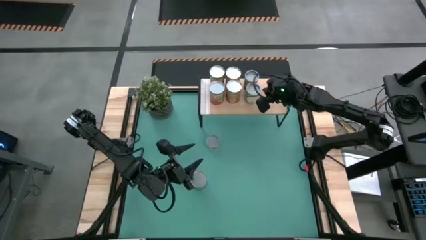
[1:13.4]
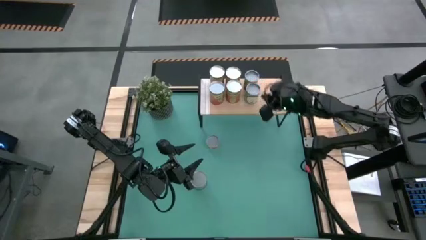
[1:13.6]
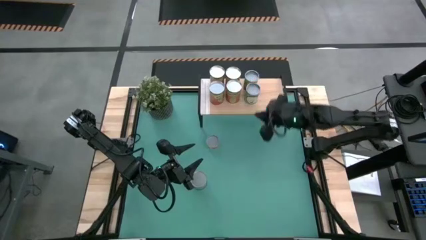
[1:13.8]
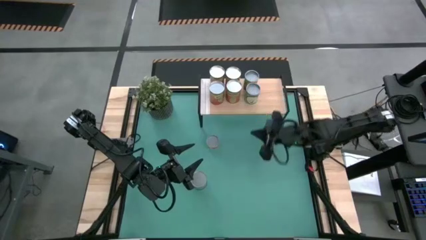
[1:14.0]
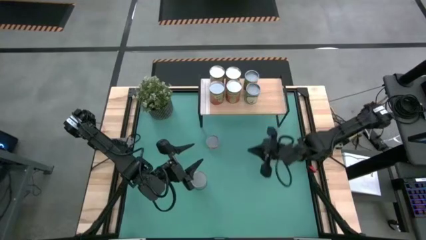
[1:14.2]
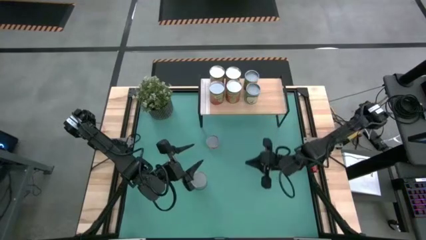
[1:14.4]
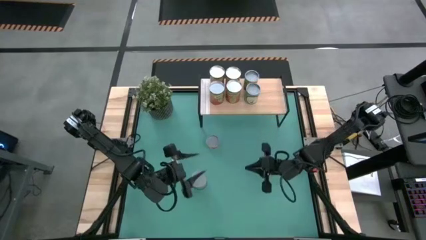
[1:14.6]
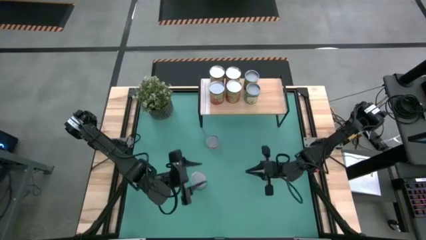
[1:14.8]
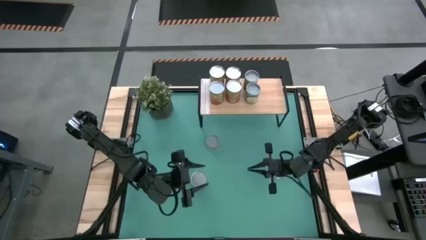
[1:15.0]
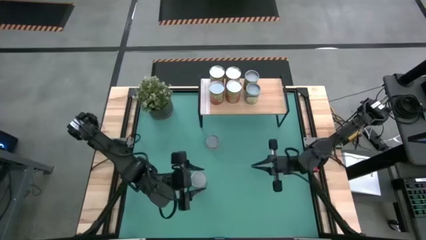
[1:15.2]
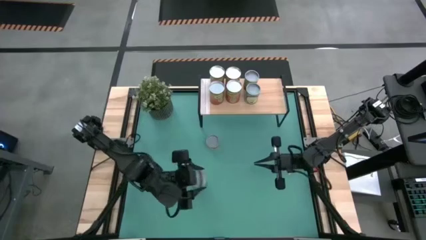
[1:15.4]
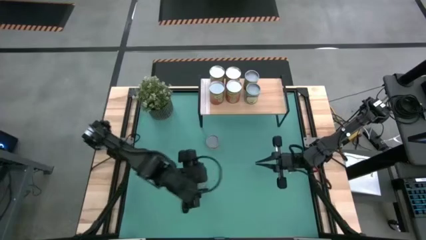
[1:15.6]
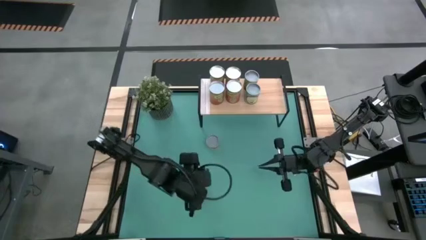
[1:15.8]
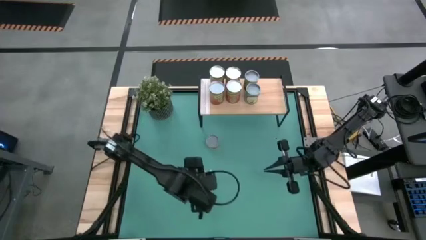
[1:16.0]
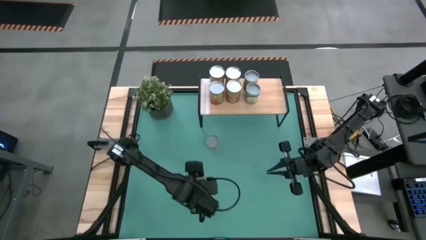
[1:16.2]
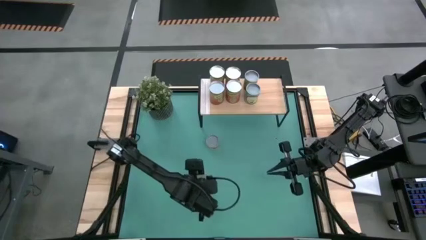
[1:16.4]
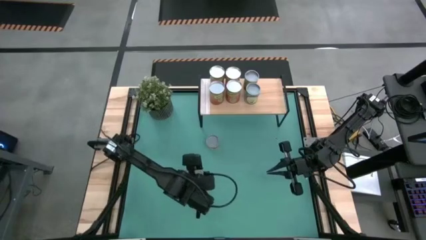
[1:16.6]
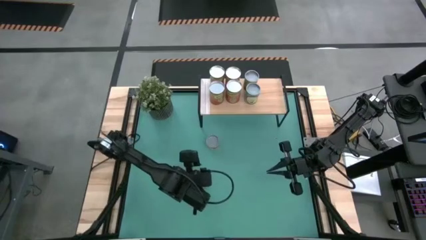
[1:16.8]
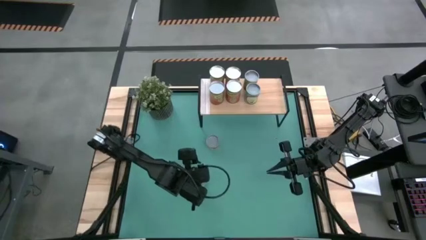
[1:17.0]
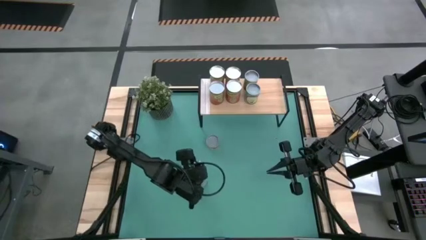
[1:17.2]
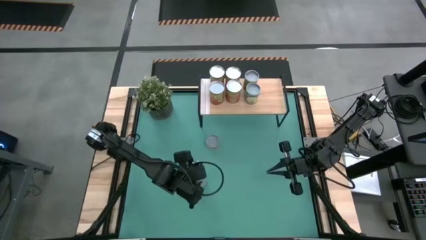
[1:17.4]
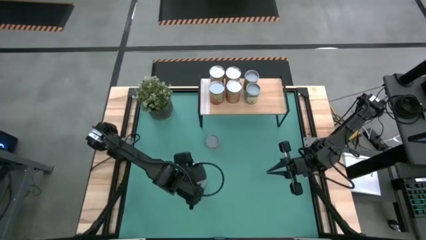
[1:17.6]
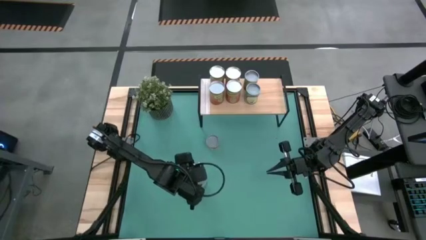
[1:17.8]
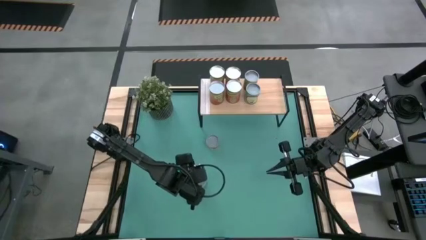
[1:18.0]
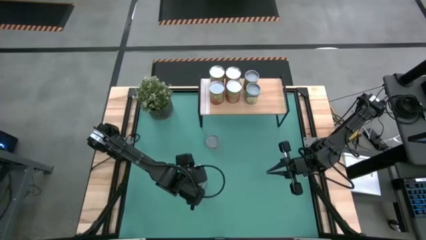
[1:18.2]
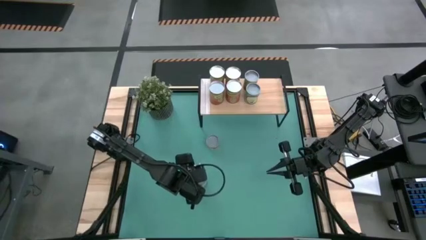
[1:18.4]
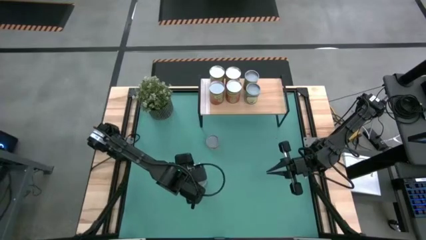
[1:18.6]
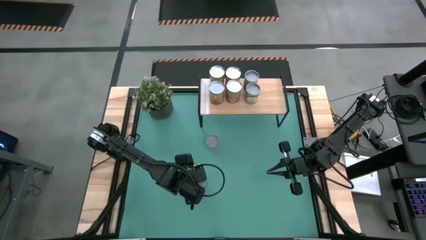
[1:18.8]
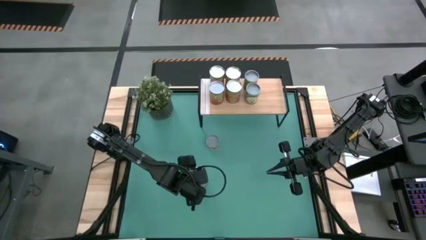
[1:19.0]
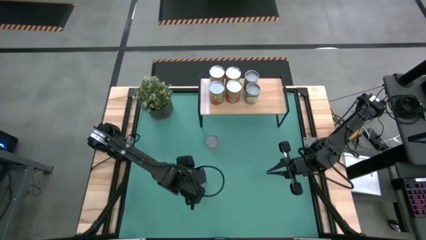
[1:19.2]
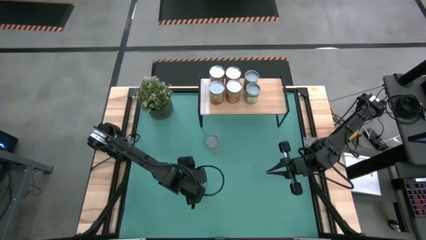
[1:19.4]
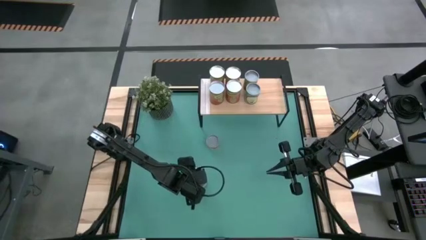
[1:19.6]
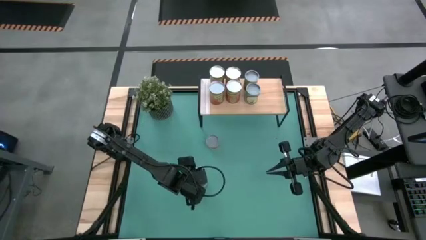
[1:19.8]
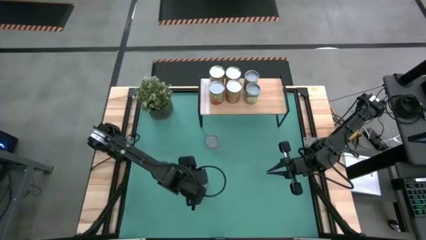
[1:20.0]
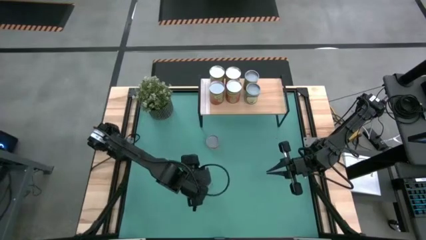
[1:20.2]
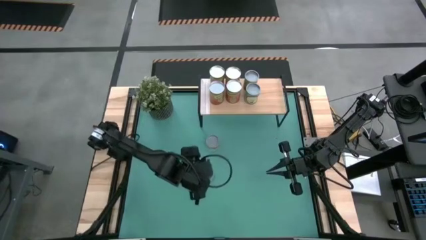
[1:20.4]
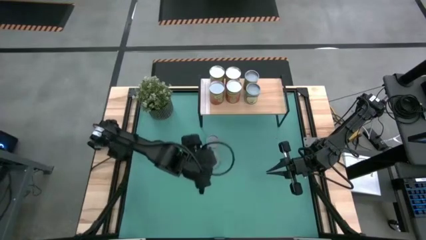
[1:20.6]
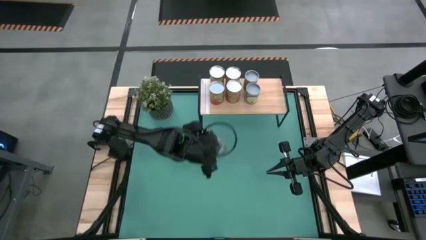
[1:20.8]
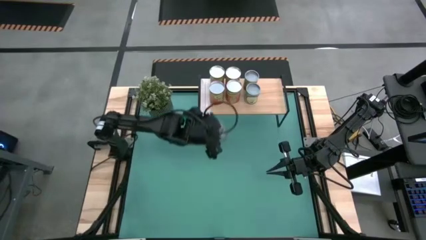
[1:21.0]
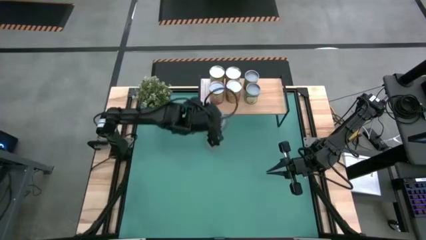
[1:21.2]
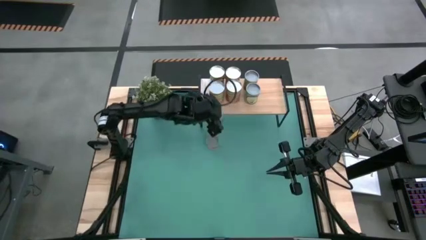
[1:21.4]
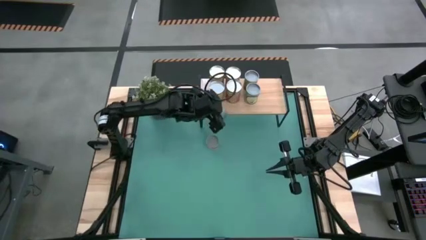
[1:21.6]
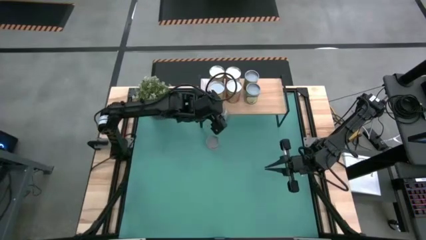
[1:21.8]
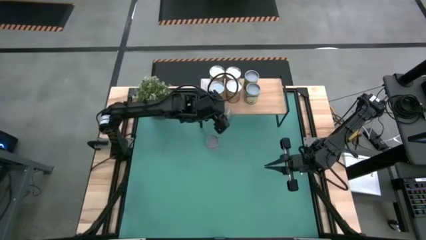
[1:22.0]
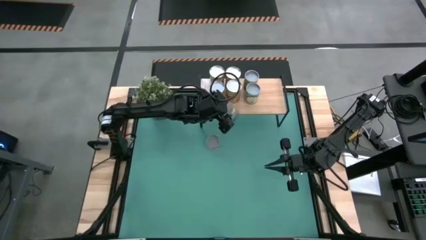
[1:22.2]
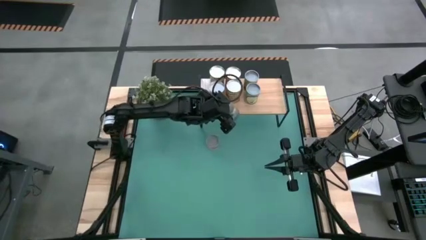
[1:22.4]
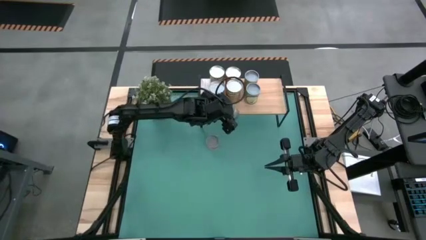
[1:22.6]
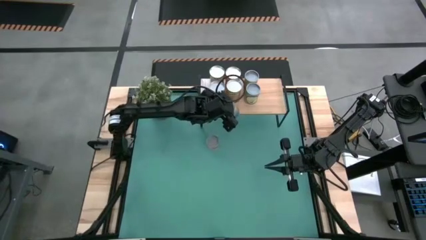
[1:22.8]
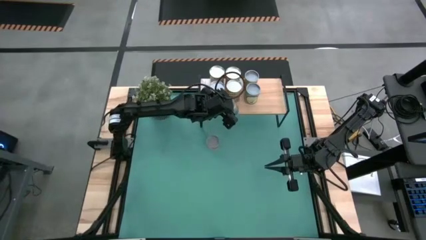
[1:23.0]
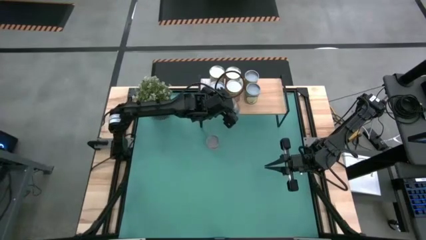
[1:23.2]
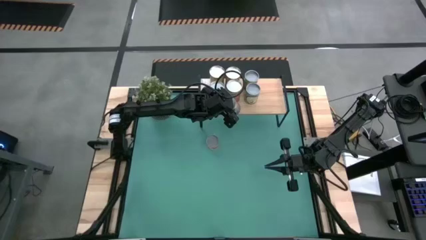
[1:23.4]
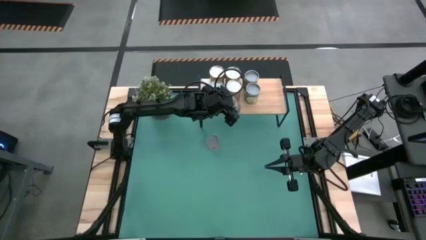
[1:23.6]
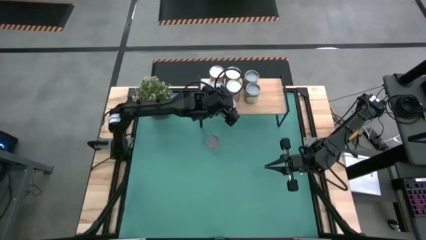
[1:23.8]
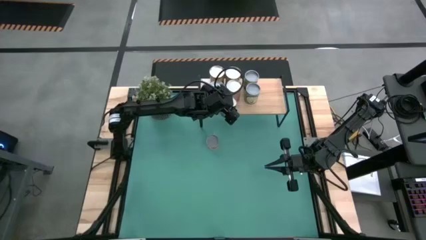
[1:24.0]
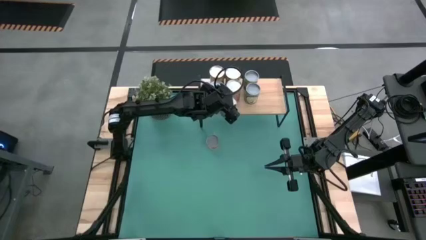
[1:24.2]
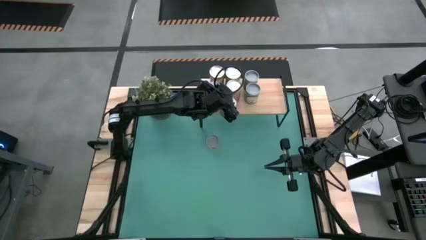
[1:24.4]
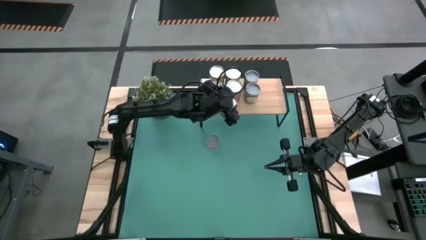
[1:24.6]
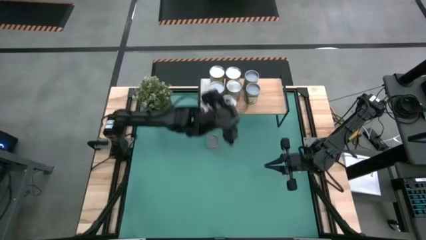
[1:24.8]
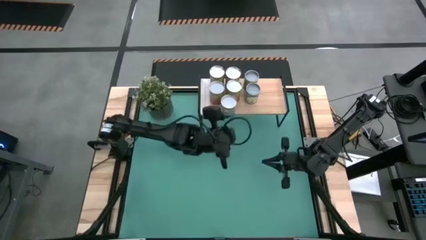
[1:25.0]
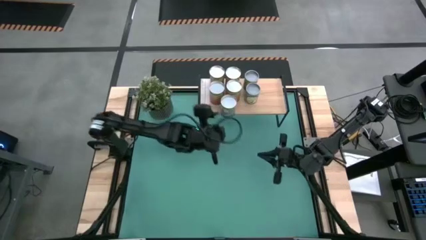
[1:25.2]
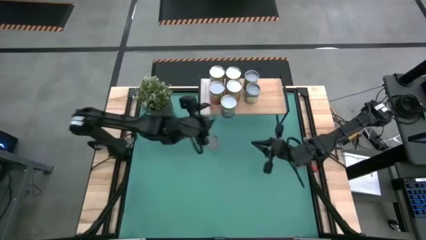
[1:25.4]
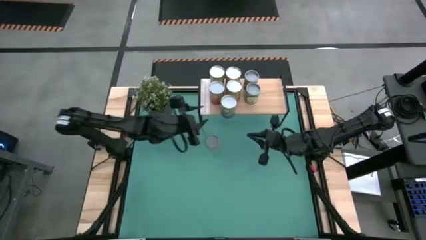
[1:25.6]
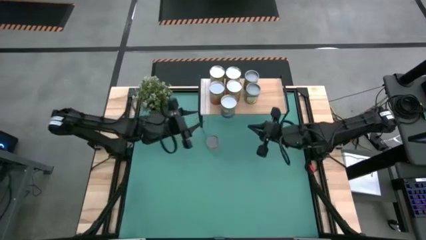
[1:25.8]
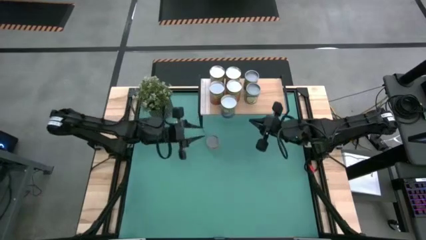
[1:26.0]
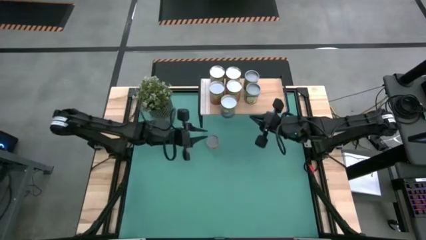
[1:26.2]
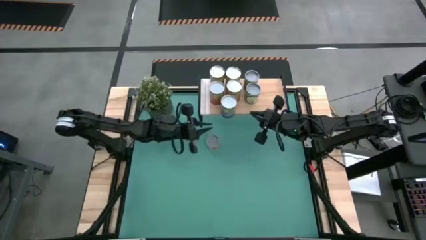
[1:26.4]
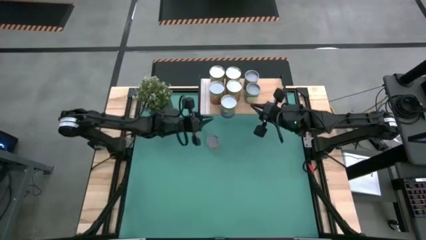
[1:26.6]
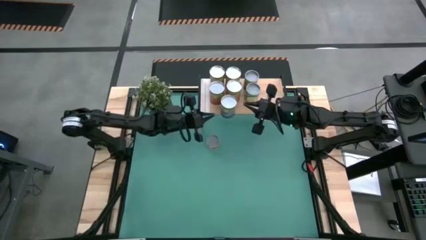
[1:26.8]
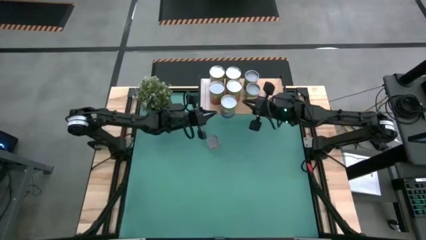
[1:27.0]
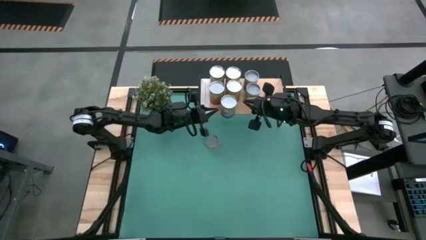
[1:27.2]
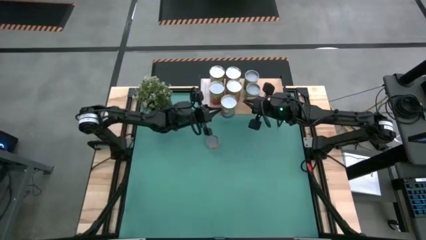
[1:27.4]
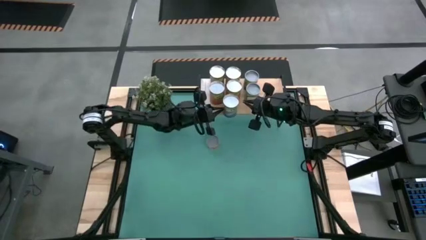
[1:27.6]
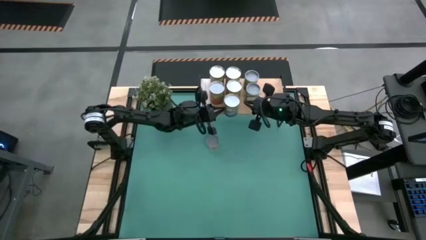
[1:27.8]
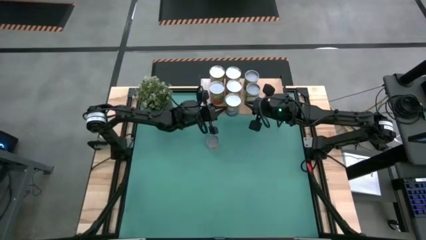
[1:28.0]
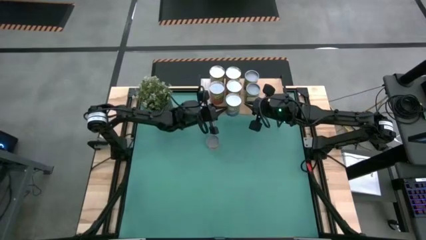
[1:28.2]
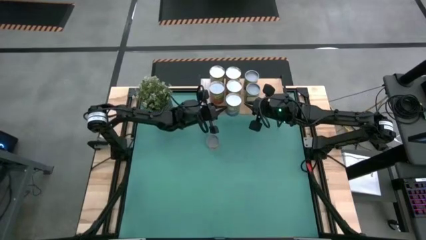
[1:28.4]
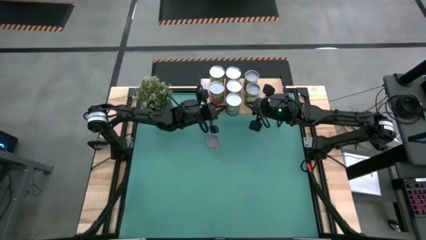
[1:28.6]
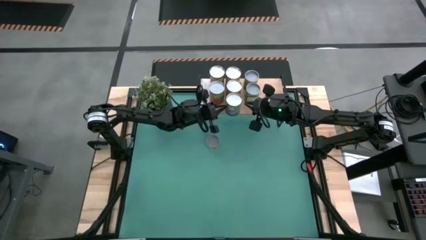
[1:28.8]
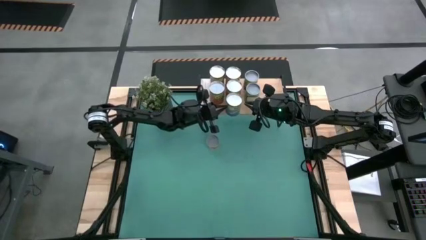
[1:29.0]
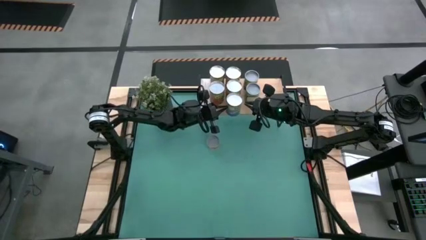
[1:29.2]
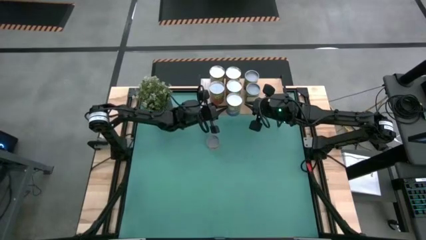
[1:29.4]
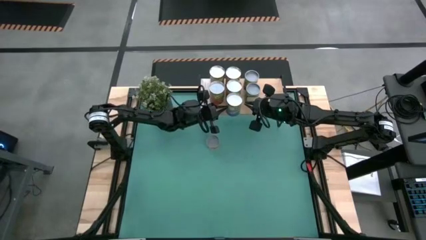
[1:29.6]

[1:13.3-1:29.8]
Task: Pick and place cans onto a shelf
Put the canned peas on the shelf
